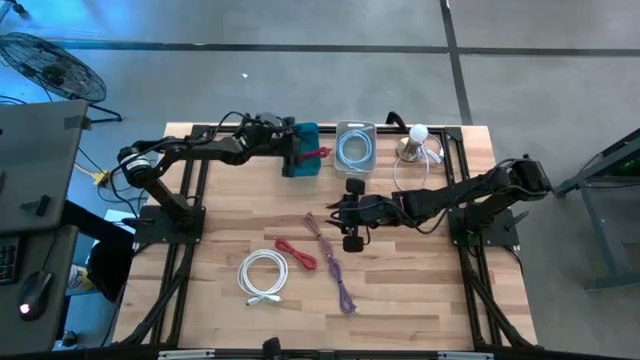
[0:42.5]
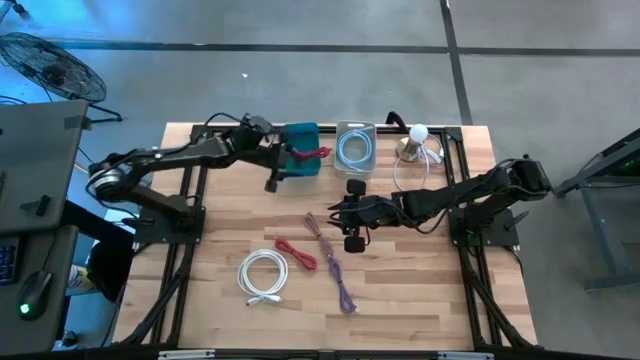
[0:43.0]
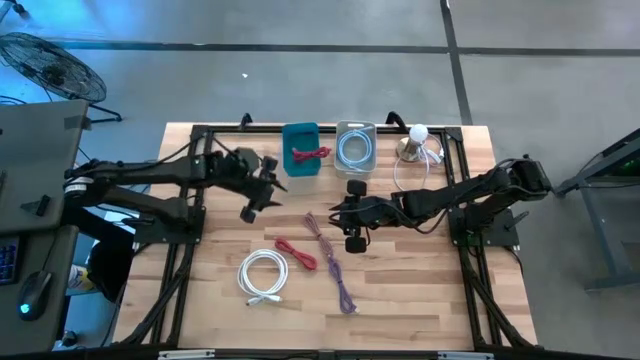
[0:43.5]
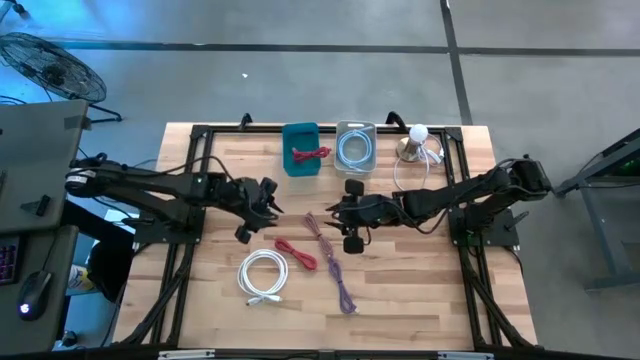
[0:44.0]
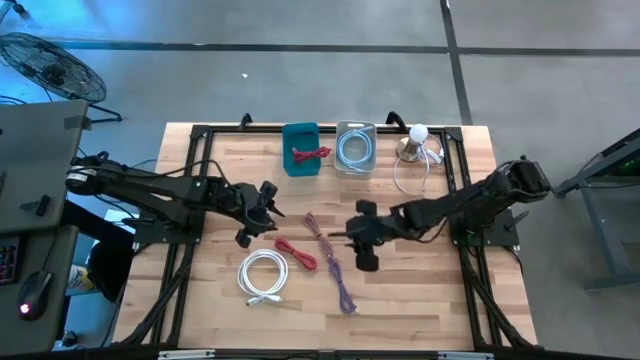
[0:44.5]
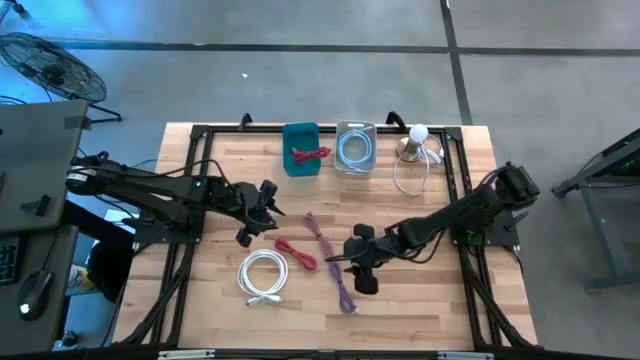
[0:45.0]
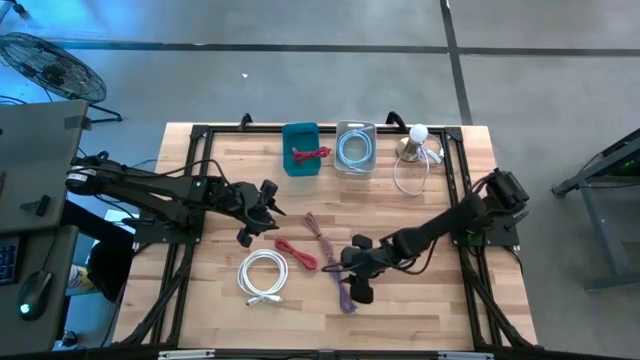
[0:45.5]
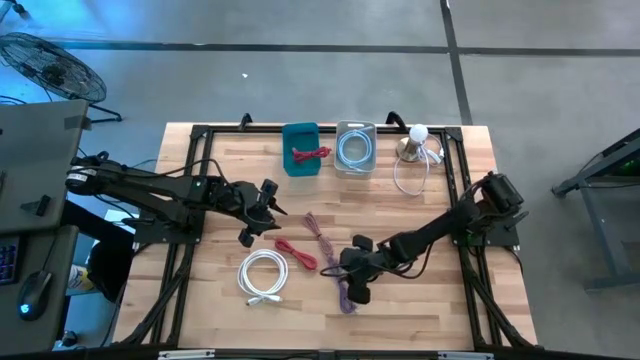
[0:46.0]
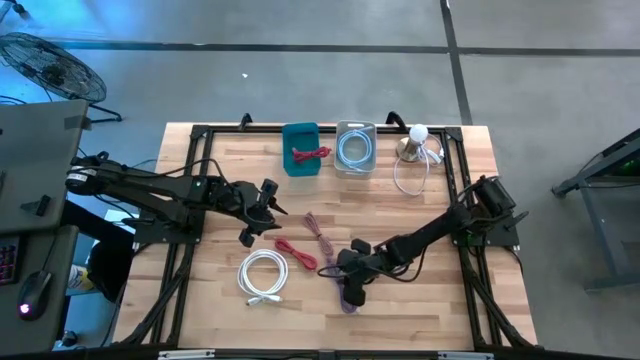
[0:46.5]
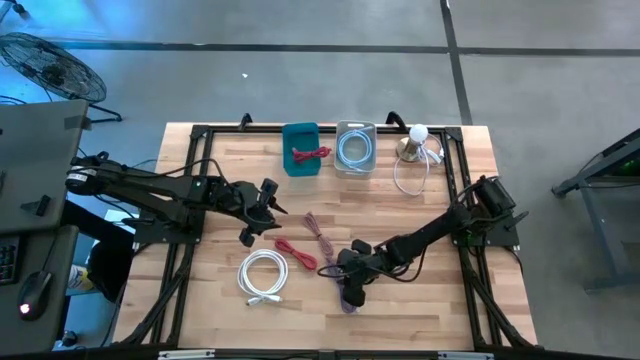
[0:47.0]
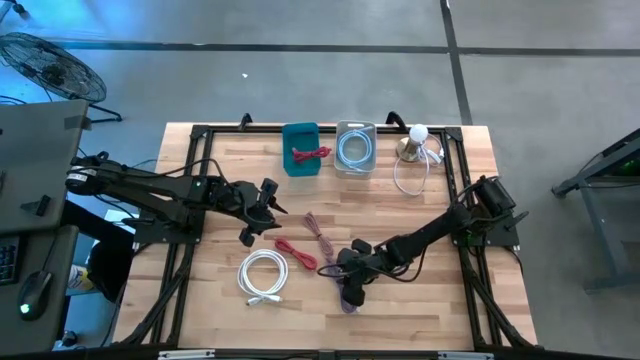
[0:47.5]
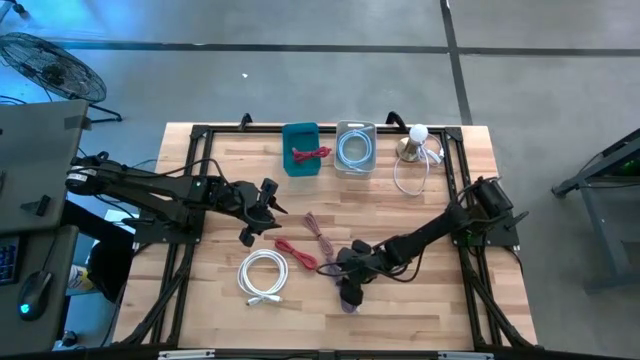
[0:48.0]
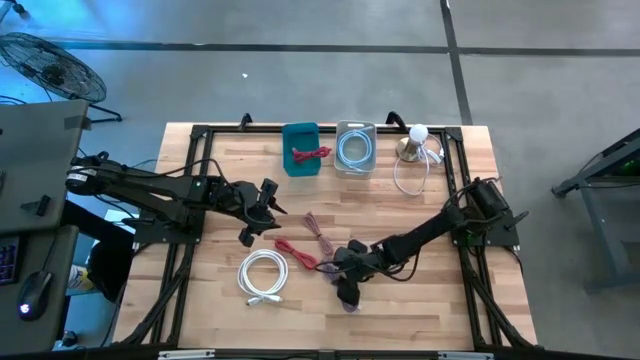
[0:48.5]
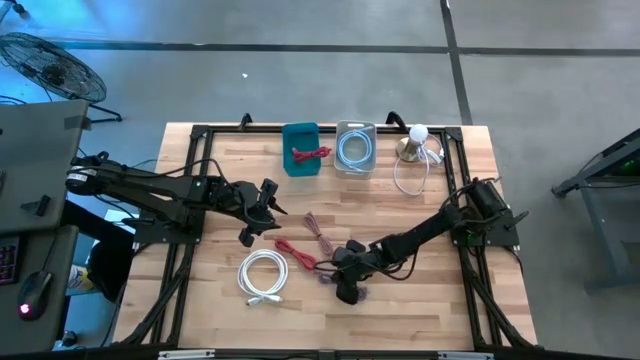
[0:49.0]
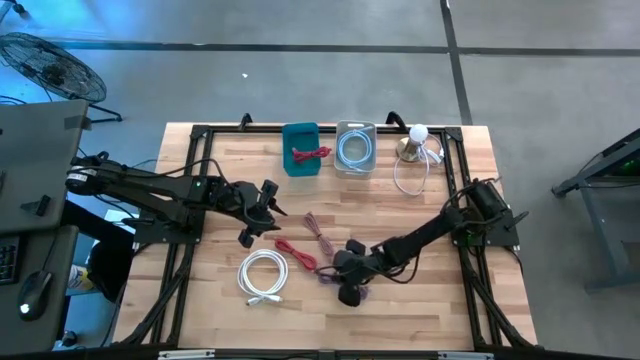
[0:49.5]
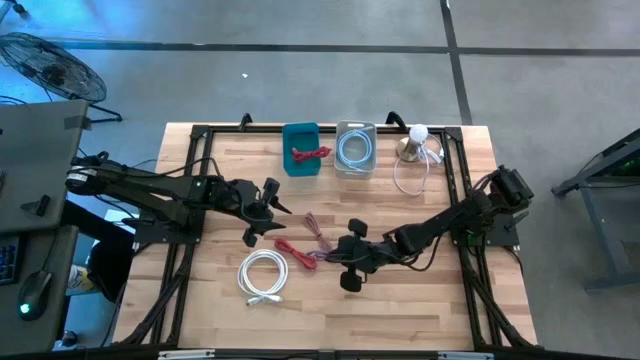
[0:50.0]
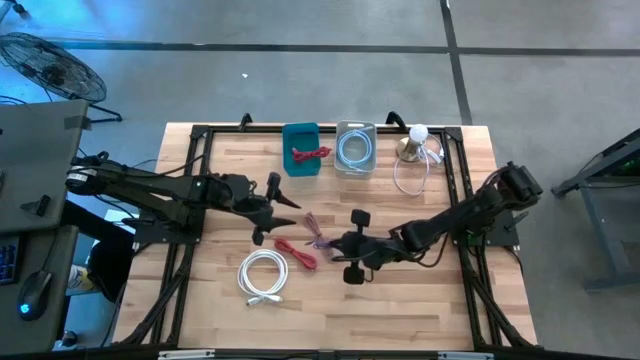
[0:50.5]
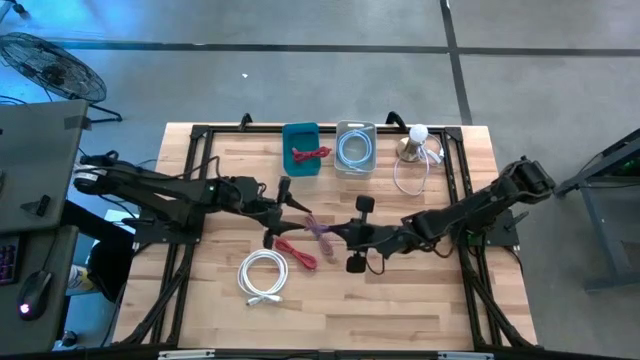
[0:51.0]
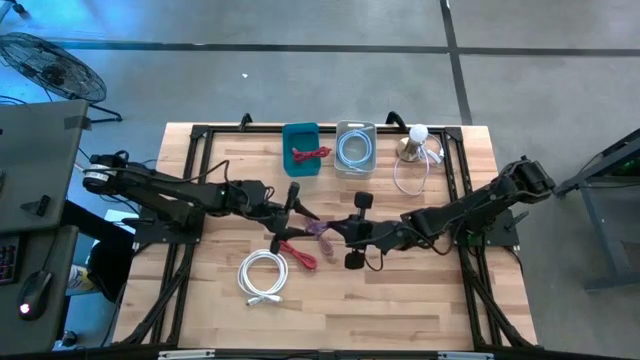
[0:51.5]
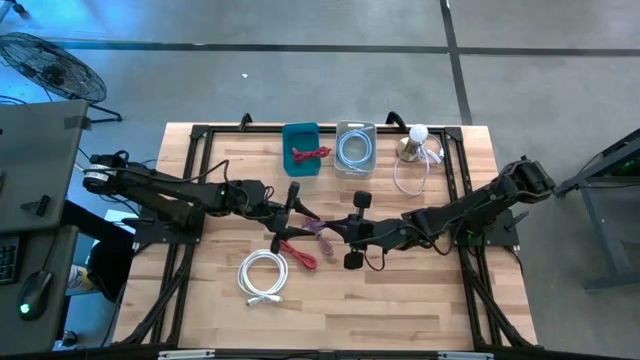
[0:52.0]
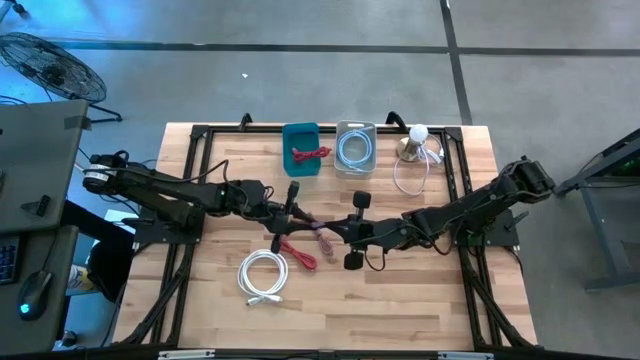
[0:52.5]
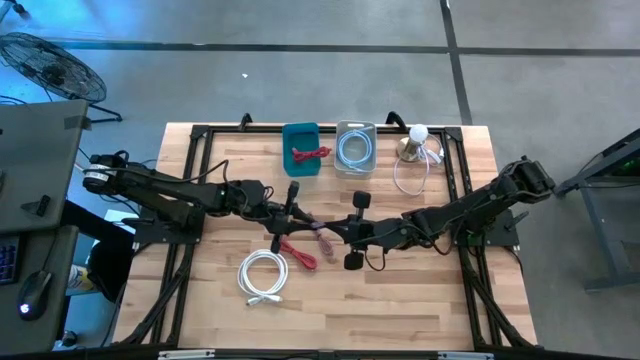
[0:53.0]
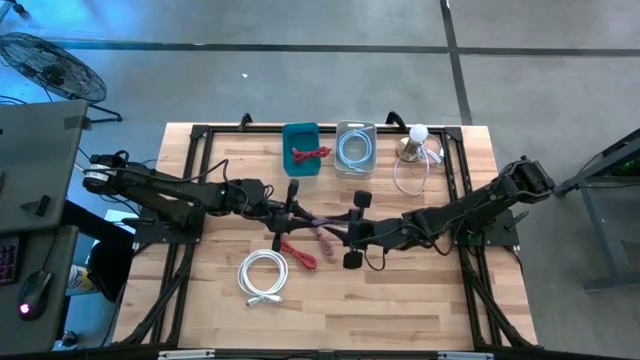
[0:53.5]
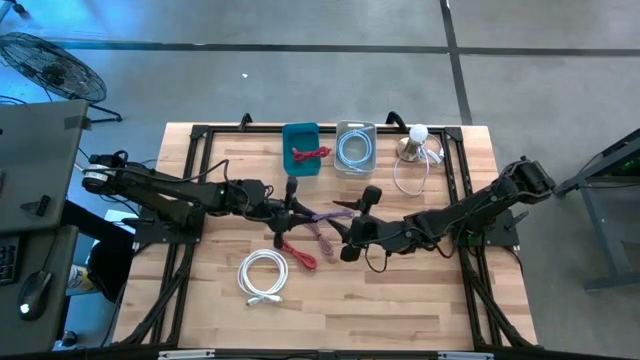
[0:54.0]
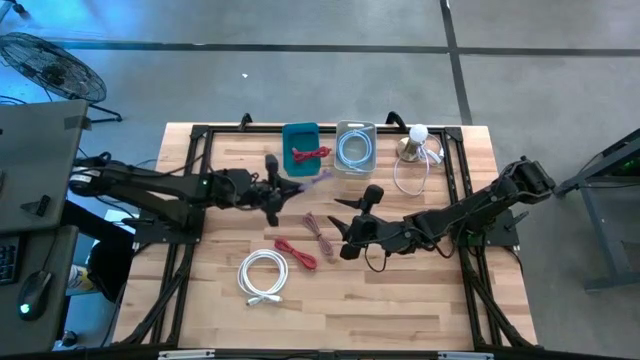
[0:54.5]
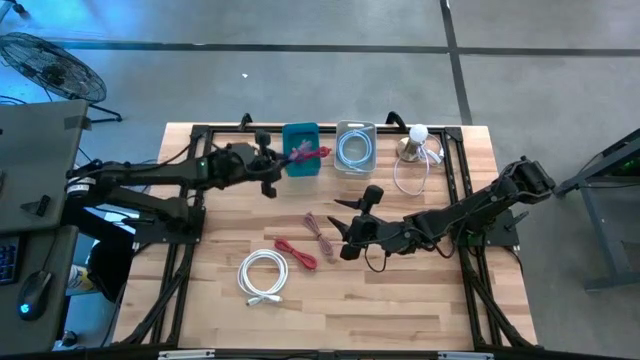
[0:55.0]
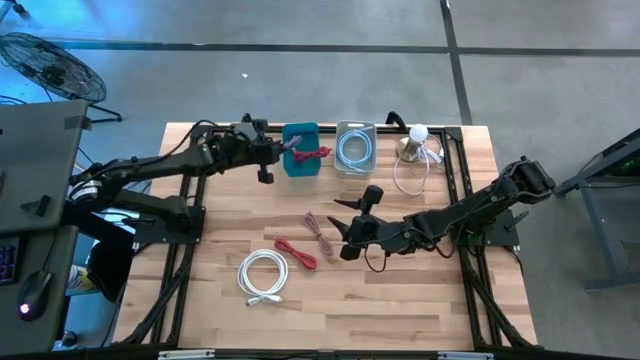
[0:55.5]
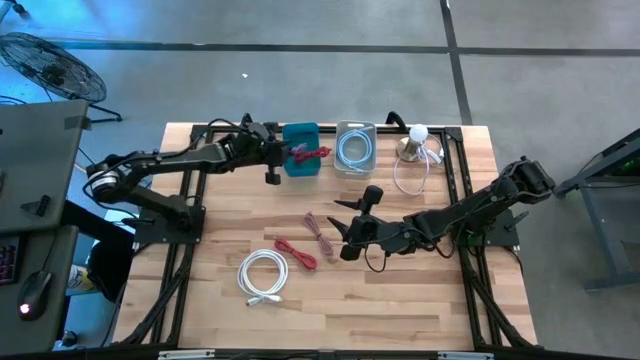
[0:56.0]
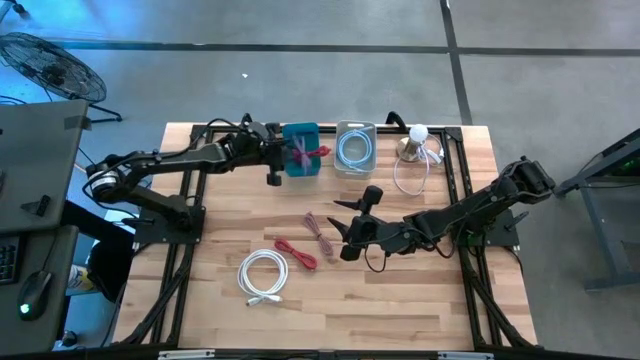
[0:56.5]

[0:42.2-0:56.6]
Task: Pick & Place USB Port
Put the purple charger cable into the blue bin

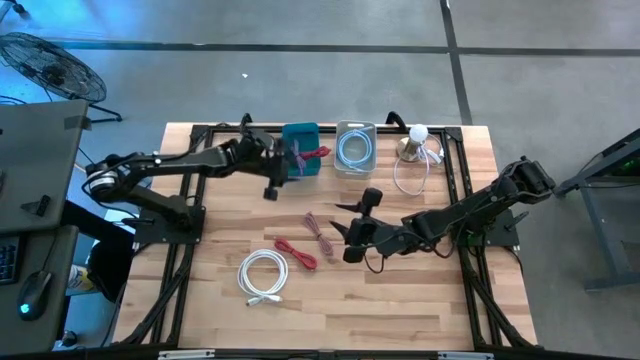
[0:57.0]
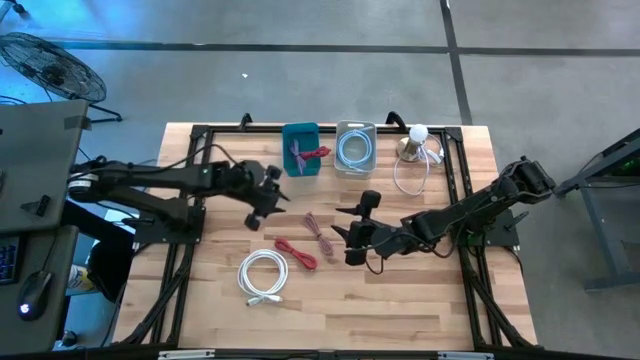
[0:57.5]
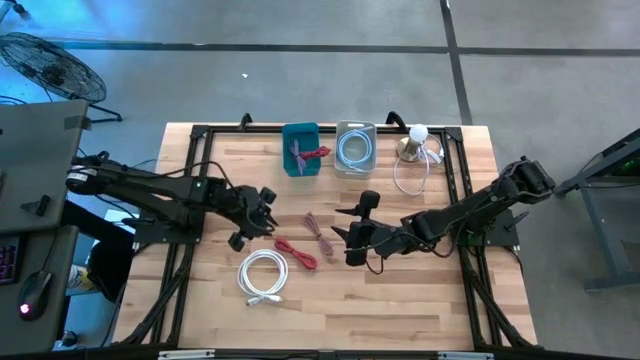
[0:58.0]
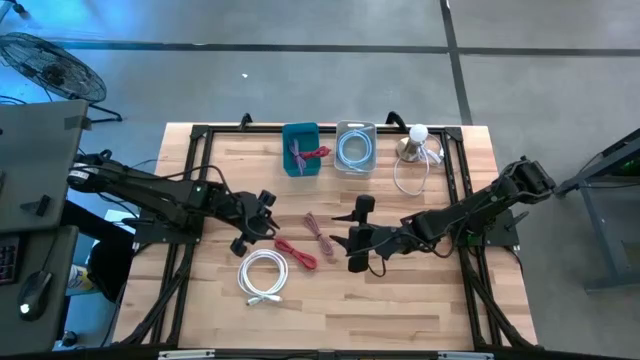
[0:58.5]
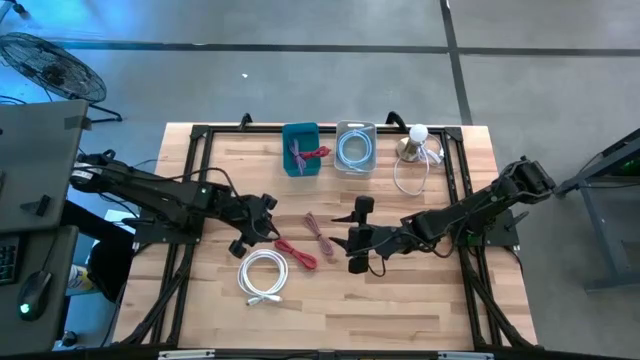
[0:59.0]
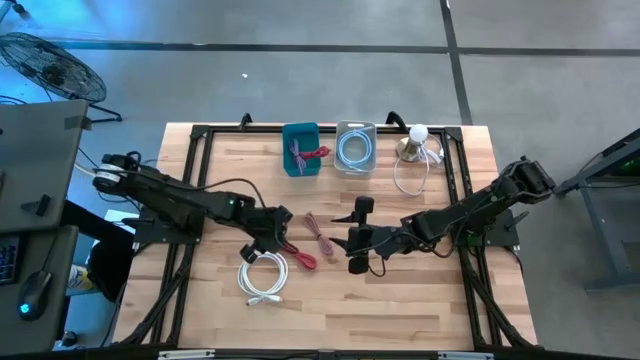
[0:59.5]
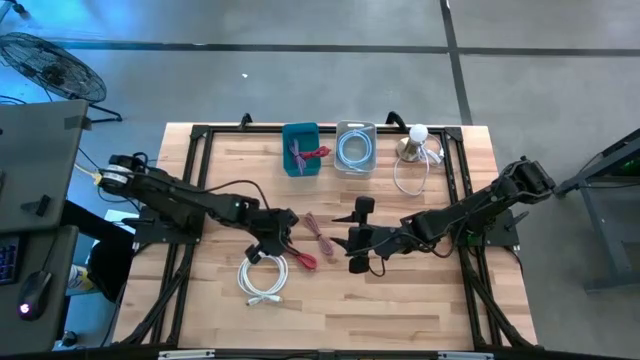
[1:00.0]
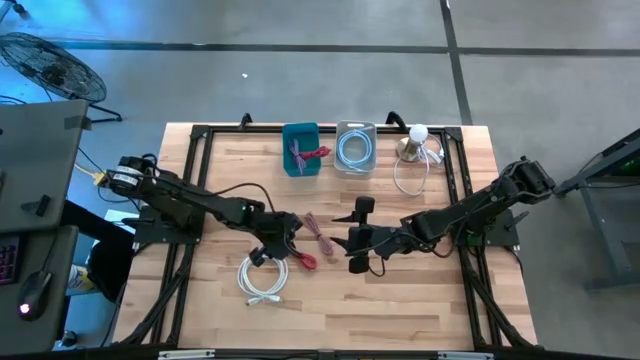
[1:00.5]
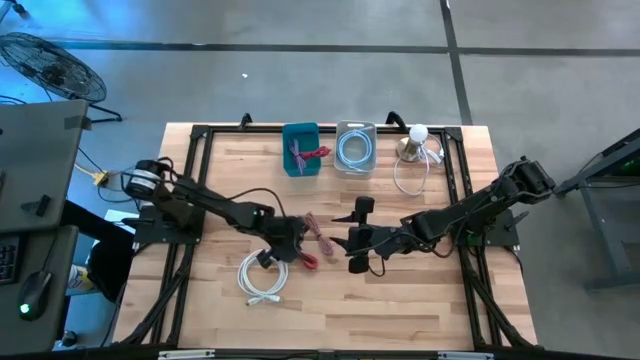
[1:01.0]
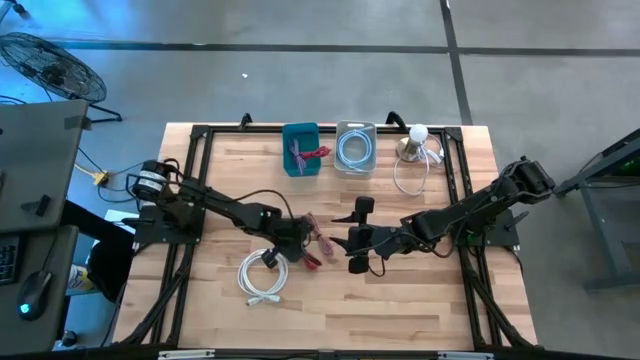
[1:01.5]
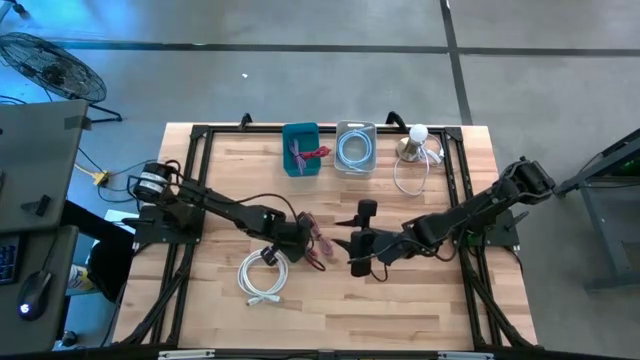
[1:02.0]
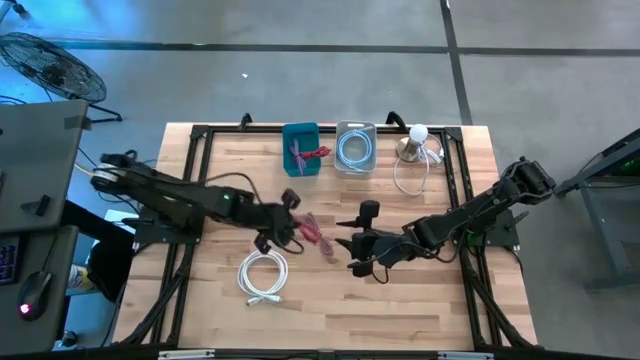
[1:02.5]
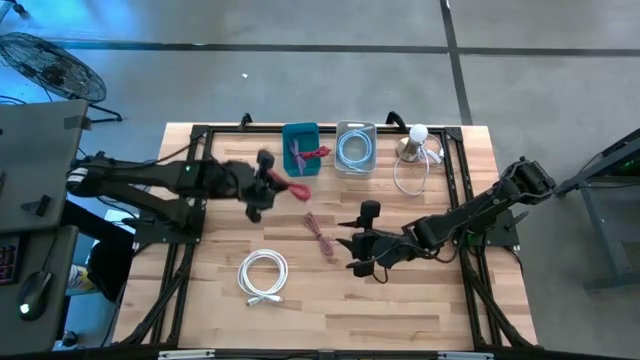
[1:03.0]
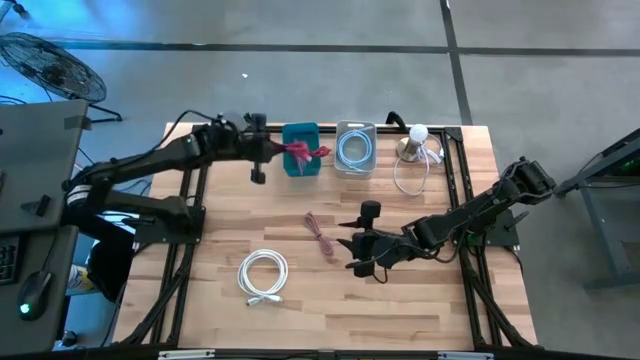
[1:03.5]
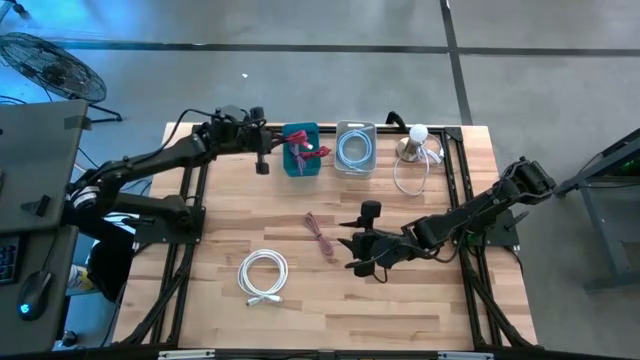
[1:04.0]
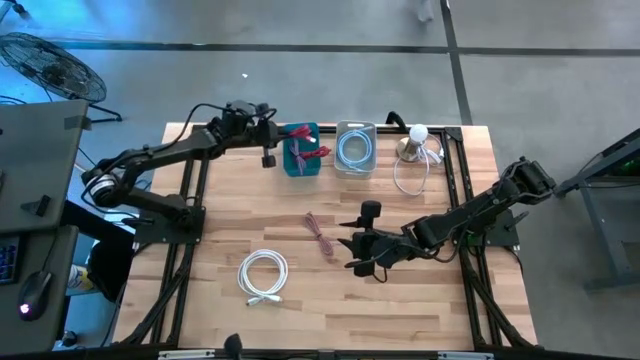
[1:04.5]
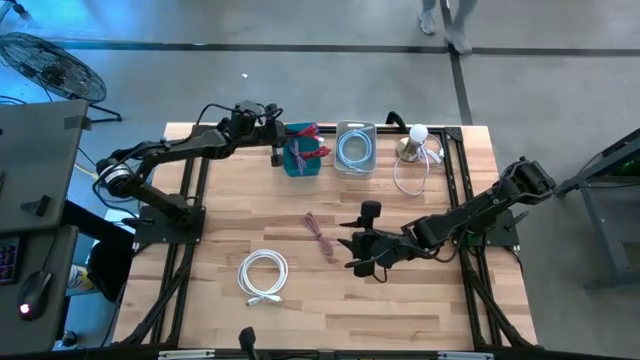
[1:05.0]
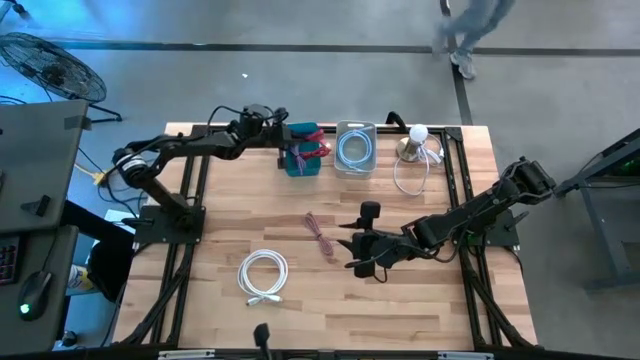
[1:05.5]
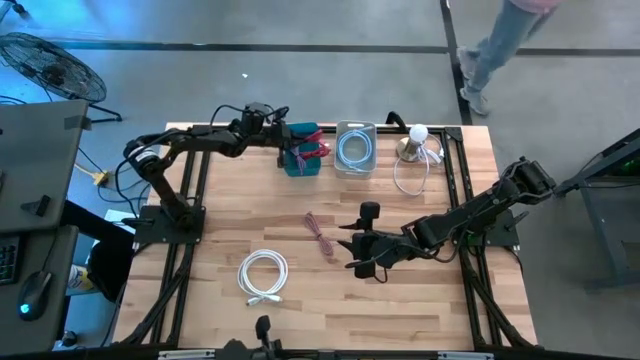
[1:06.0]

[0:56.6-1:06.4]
Put the orange charger cable into the blue bin
